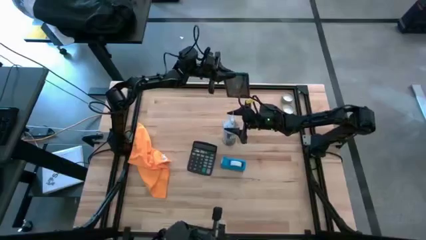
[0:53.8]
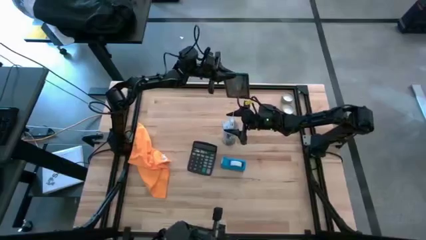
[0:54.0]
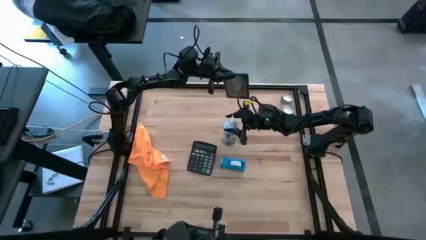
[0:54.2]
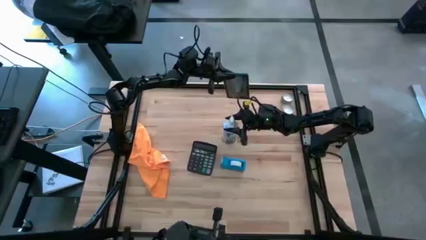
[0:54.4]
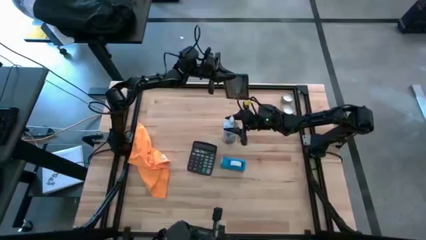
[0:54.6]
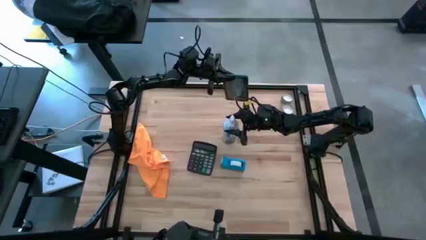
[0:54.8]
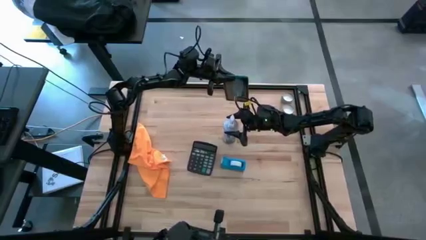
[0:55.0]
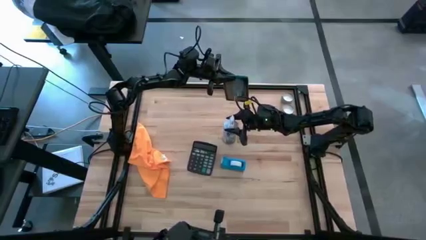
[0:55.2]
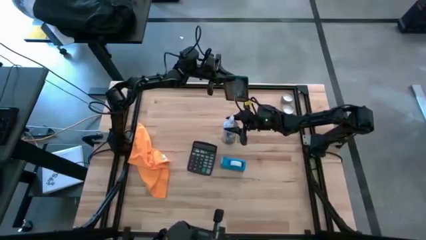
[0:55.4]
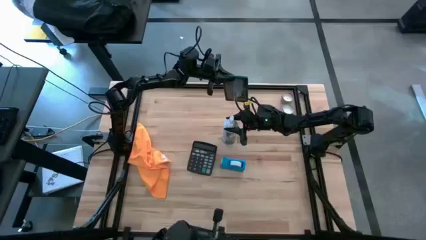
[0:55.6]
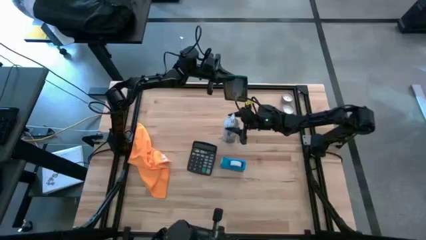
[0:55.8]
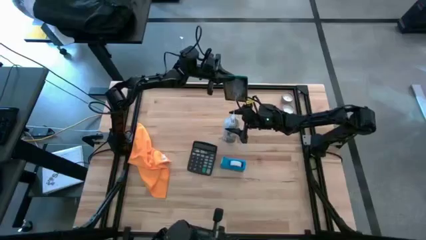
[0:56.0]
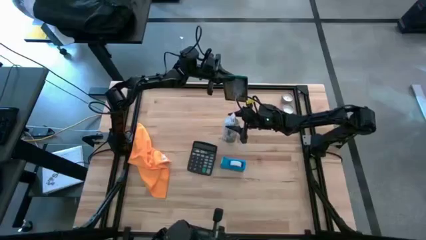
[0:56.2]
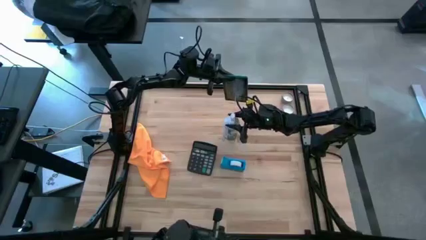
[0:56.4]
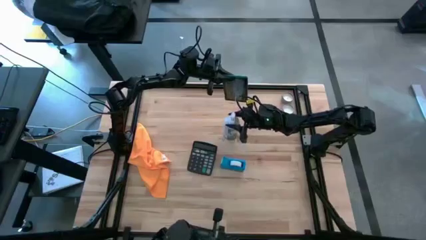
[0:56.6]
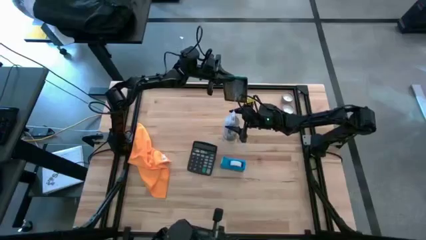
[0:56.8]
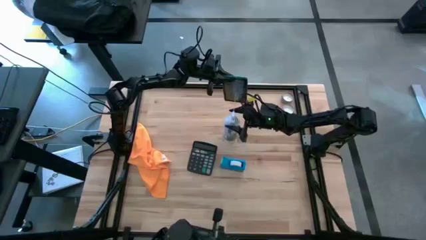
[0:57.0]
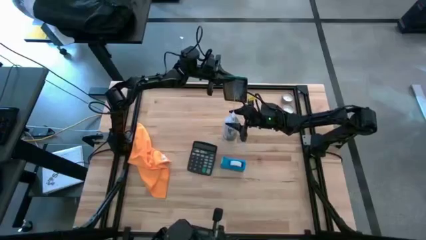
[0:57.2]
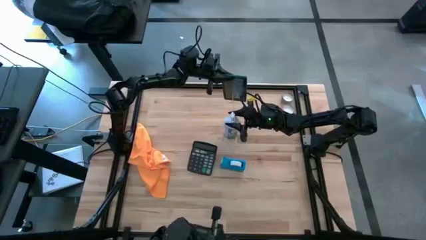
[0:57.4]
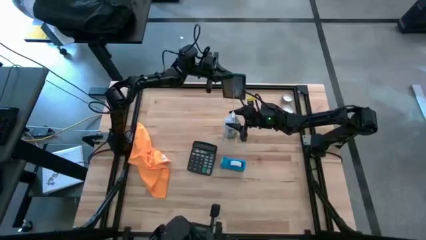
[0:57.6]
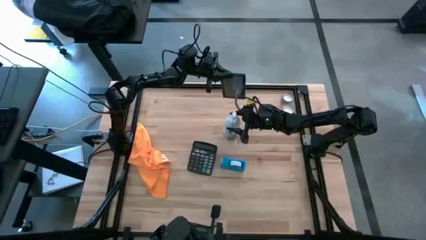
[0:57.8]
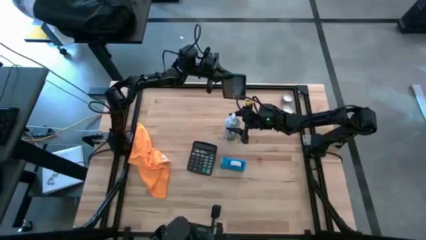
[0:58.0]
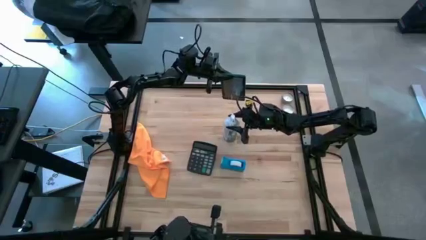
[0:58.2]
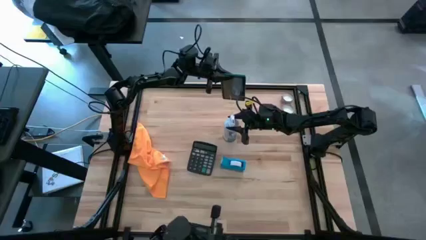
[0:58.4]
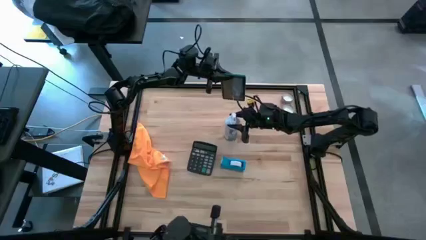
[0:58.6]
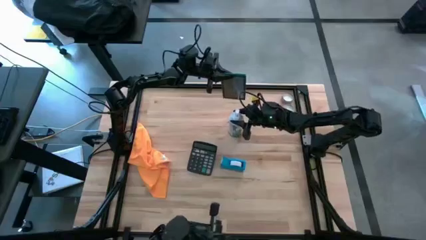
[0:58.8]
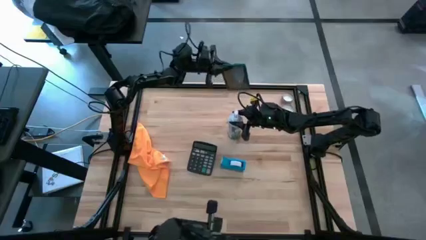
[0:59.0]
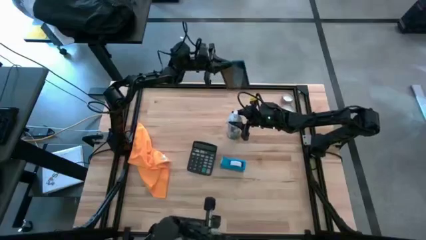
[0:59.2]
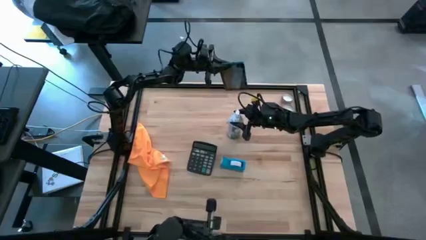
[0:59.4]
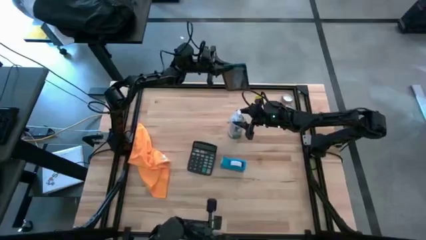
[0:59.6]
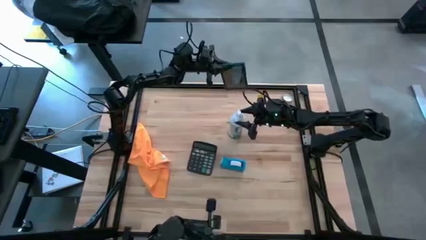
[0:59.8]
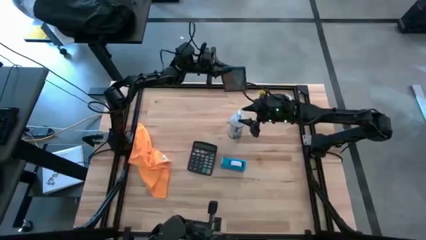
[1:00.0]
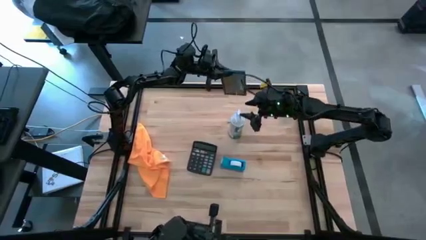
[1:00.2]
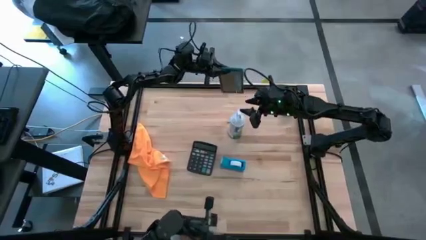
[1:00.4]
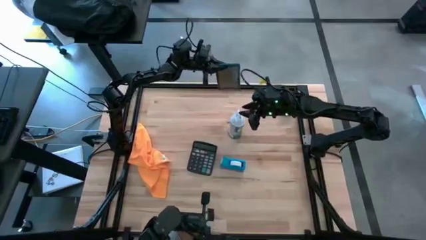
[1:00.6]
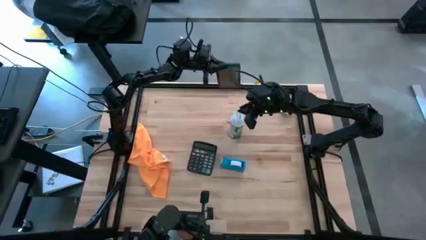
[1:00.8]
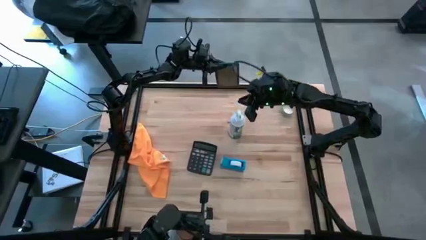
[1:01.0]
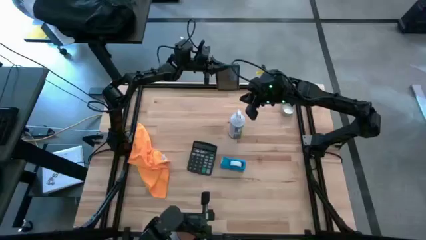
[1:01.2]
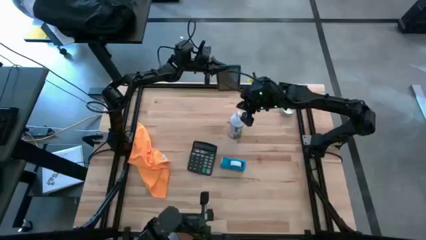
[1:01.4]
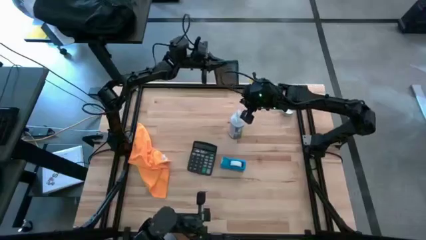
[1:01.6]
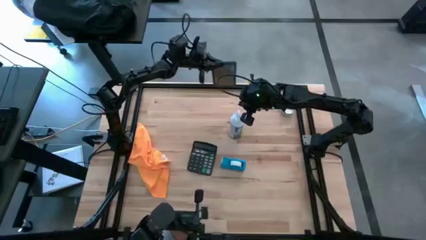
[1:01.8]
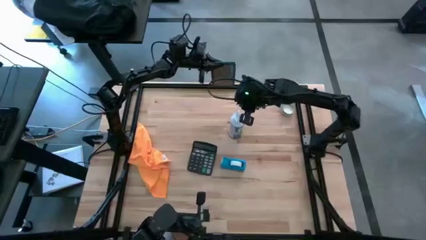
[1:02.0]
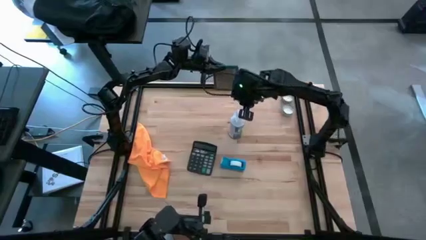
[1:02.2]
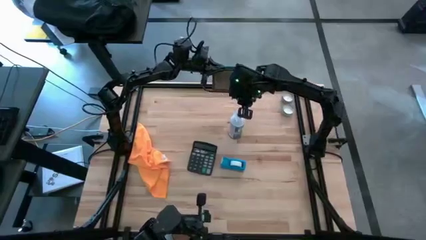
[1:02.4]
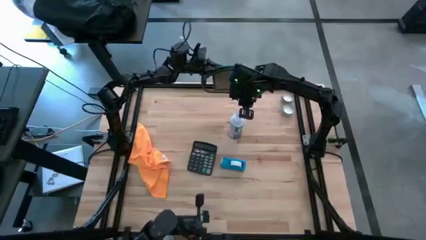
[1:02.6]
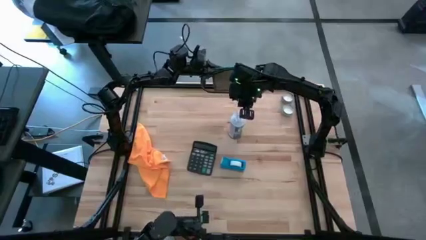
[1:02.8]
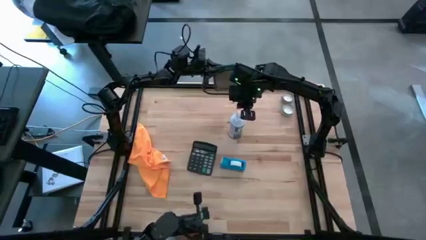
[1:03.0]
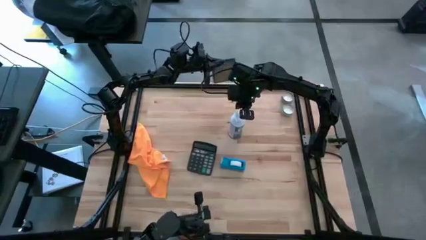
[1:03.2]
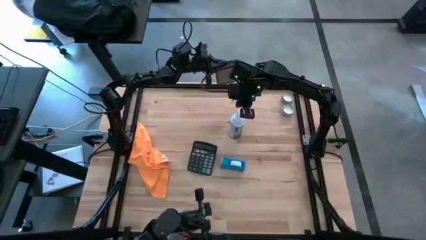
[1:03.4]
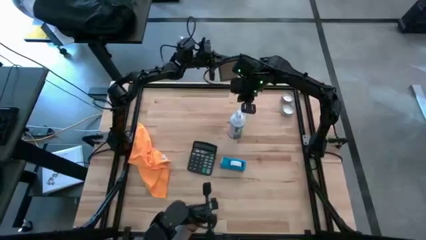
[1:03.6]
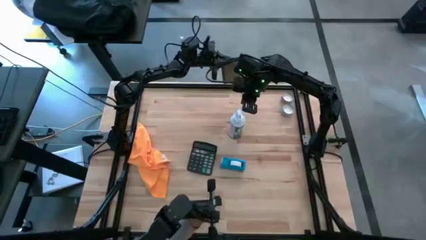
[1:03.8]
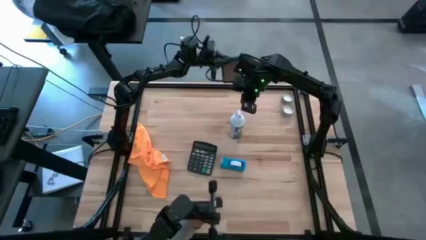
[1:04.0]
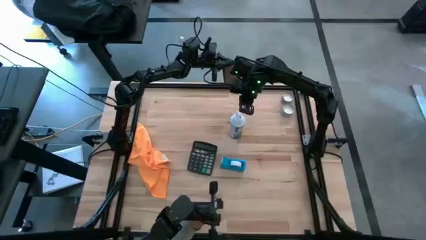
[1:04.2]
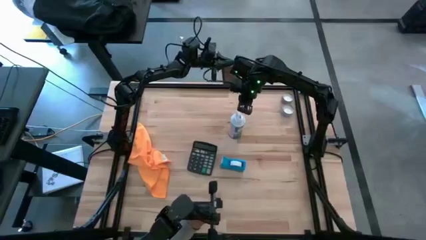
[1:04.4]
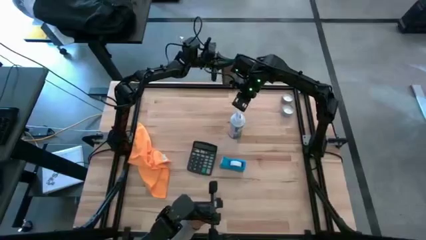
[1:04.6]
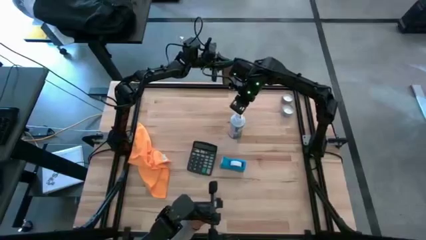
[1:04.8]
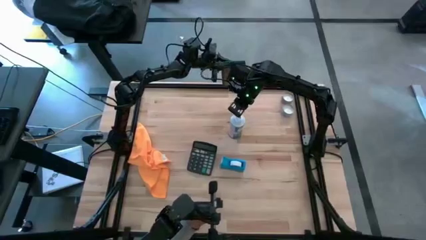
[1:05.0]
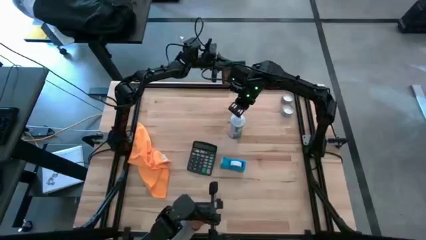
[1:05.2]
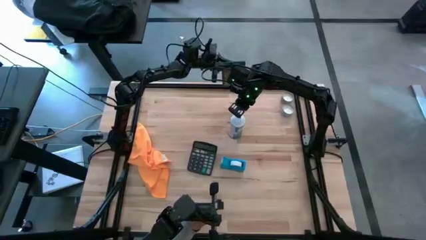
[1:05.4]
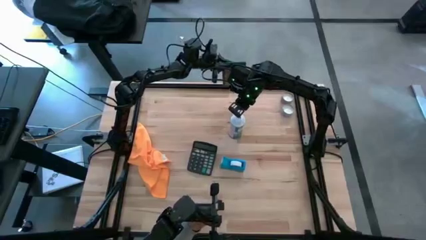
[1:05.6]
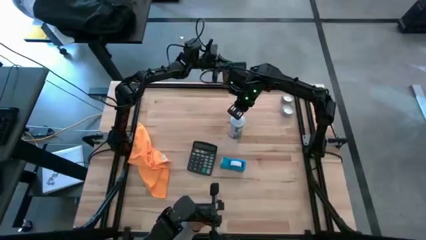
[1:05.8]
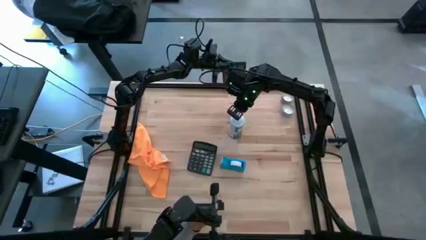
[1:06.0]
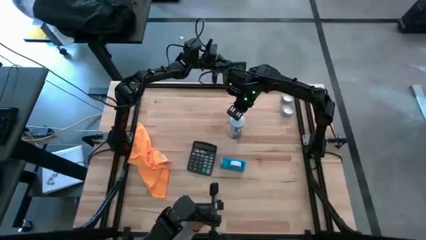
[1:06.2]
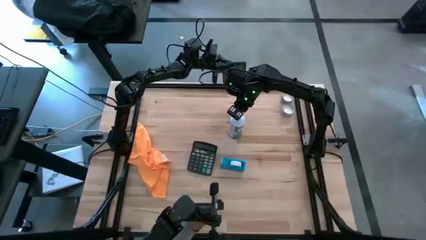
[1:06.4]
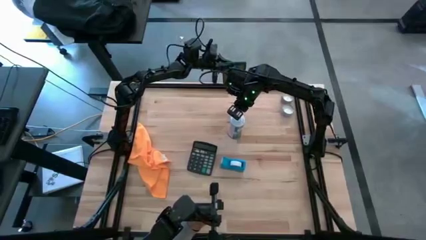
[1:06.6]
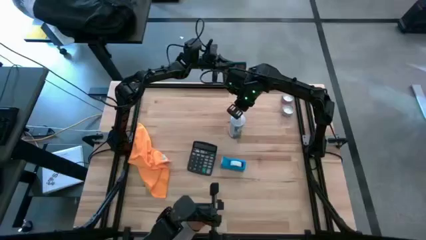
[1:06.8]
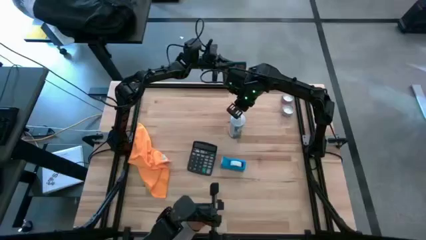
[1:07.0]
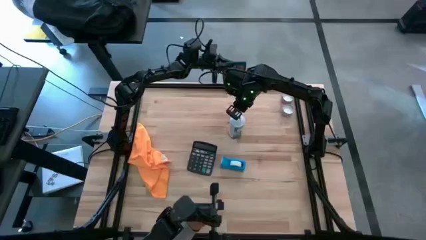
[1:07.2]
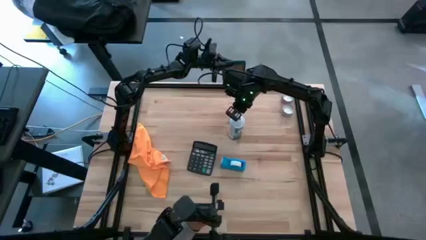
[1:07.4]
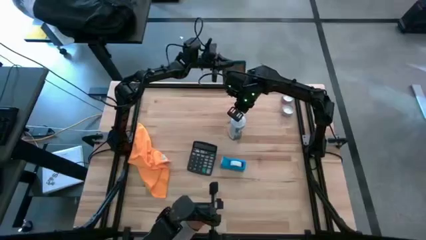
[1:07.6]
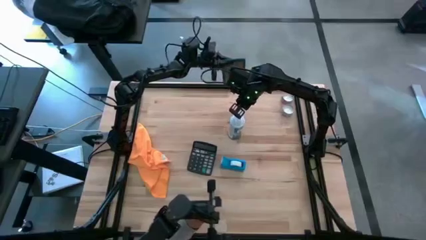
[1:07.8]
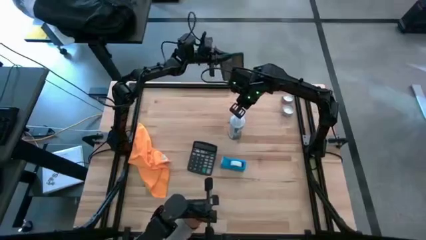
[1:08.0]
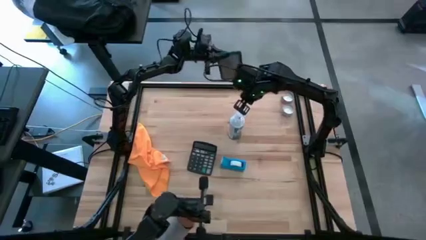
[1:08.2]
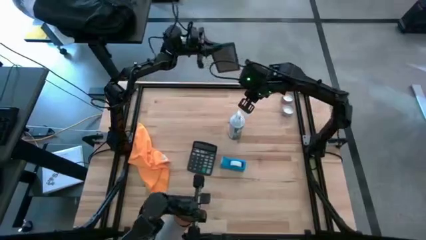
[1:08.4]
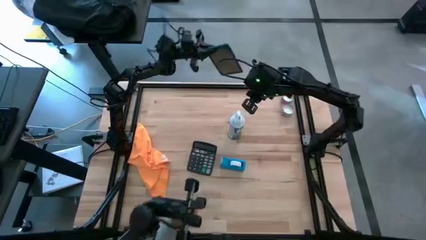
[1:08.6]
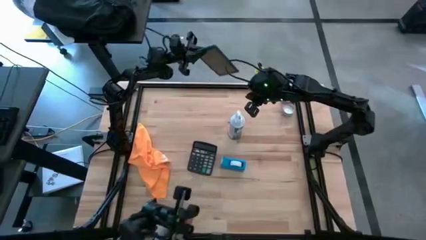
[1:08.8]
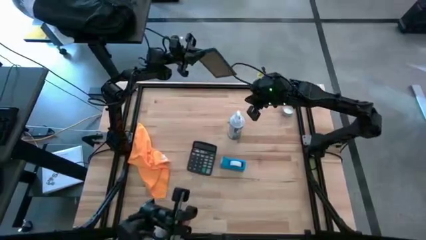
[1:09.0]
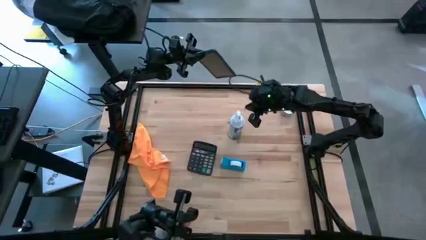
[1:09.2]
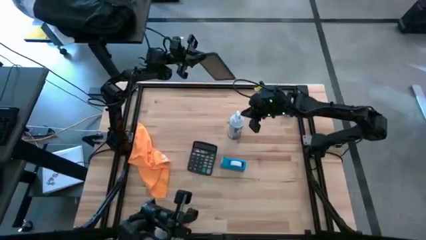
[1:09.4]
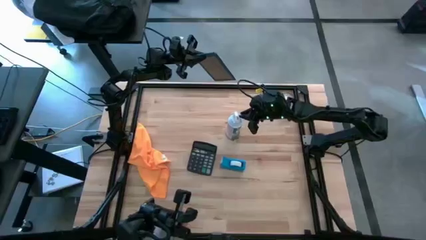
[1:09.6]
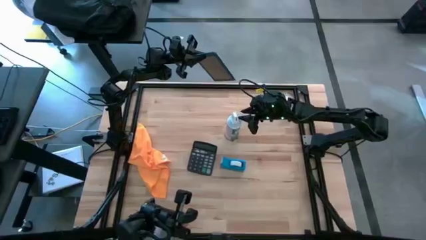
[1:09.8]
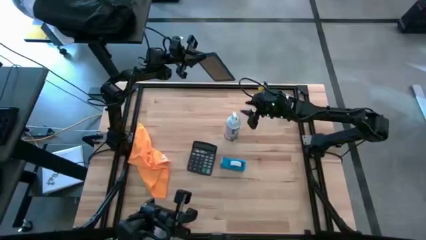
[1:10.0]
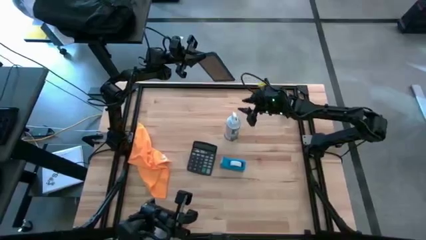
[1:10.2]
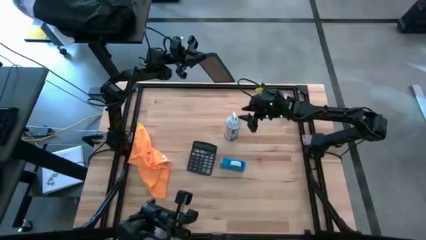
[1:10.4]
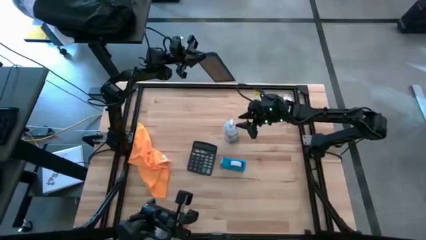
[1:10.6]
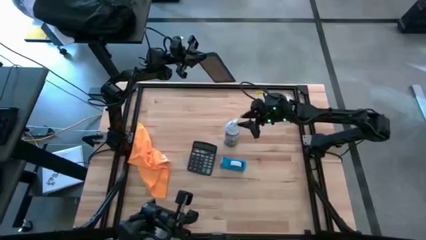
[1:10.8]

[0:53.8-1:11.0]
Task: Apply microfiber cloth
Spray the front of the cellphone with spray bottle
